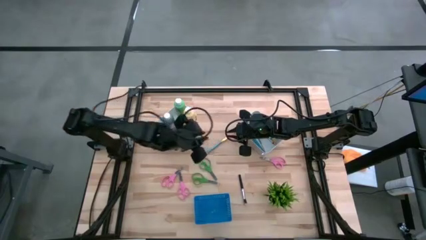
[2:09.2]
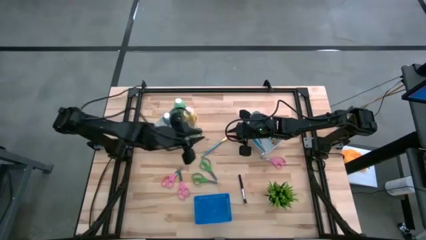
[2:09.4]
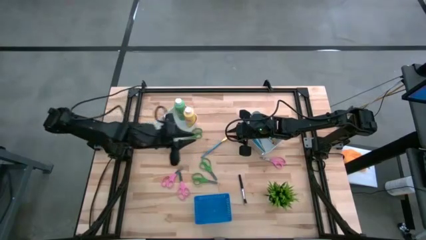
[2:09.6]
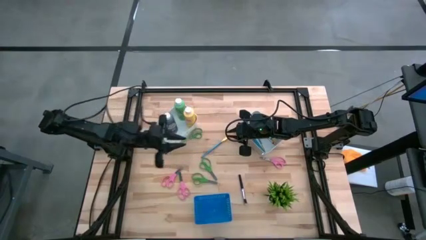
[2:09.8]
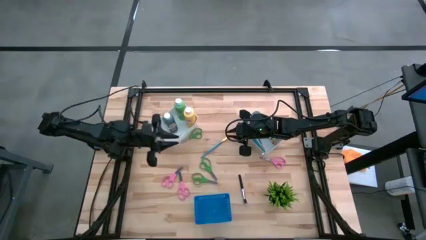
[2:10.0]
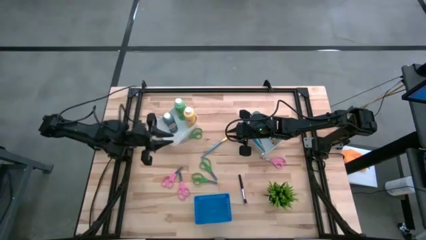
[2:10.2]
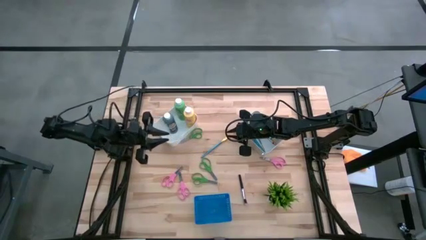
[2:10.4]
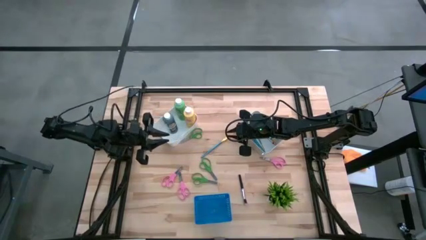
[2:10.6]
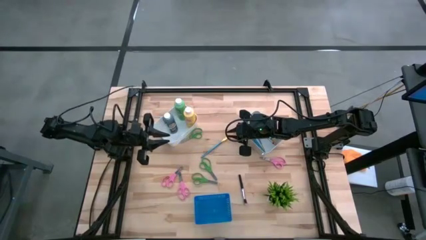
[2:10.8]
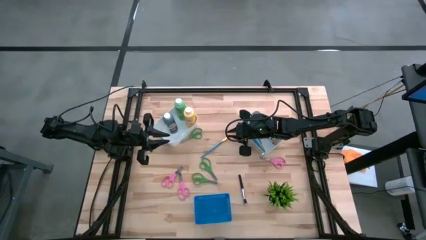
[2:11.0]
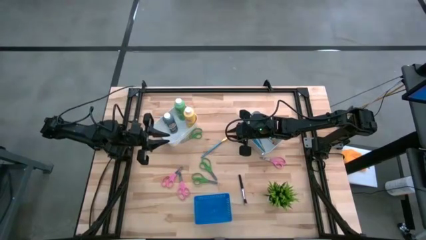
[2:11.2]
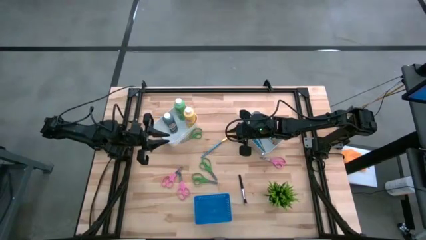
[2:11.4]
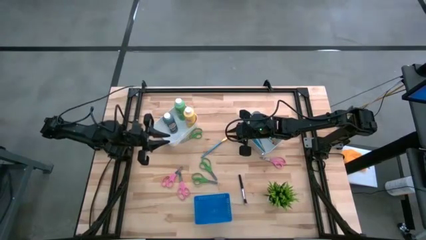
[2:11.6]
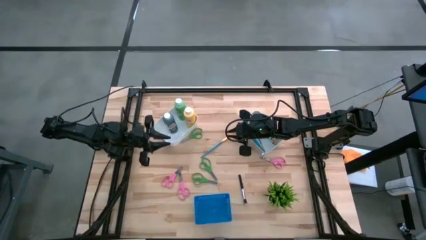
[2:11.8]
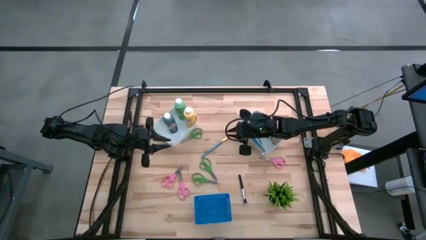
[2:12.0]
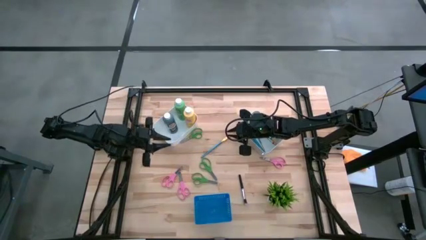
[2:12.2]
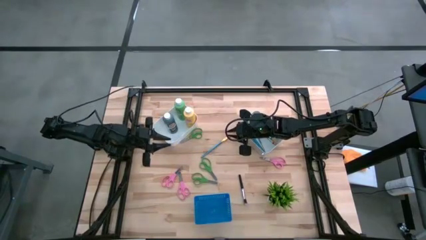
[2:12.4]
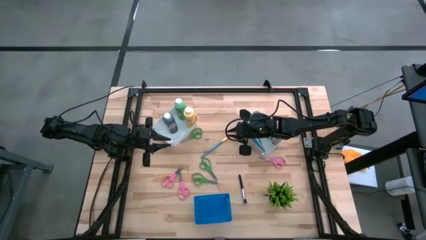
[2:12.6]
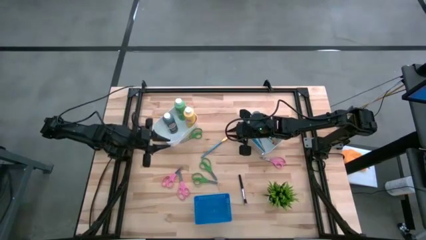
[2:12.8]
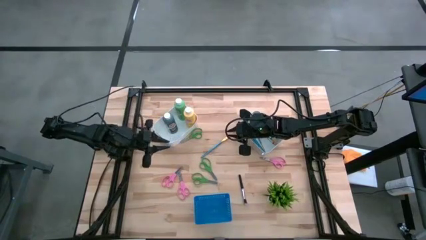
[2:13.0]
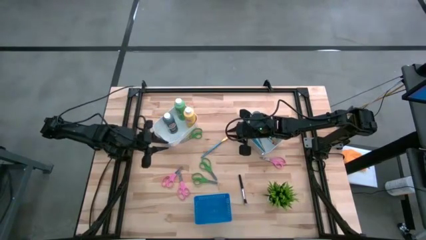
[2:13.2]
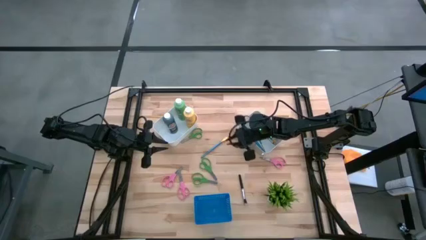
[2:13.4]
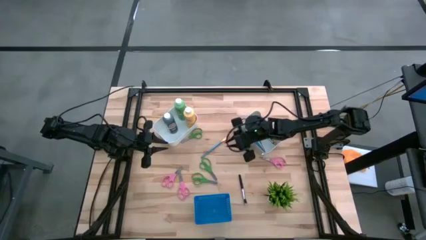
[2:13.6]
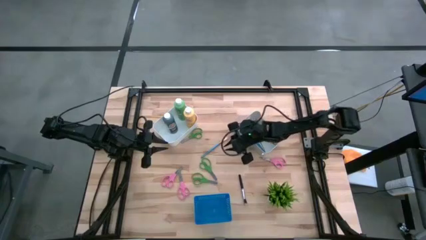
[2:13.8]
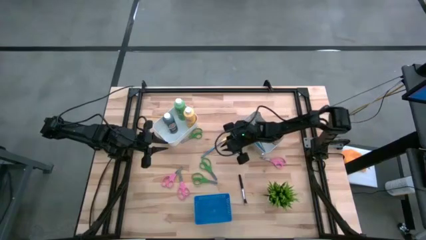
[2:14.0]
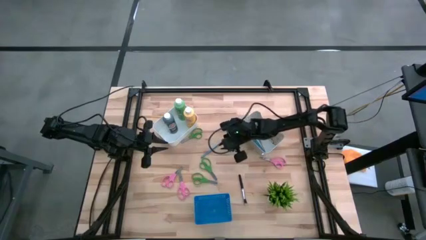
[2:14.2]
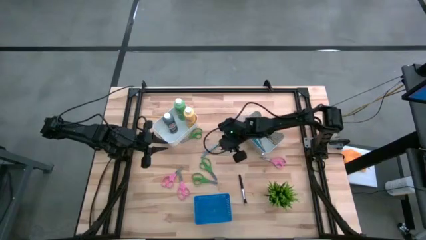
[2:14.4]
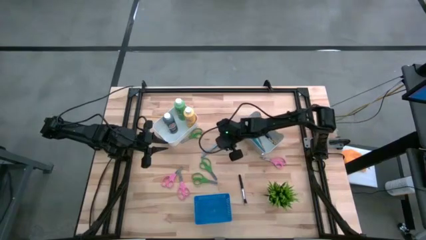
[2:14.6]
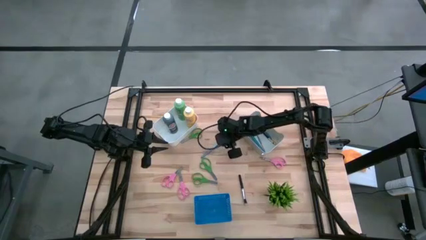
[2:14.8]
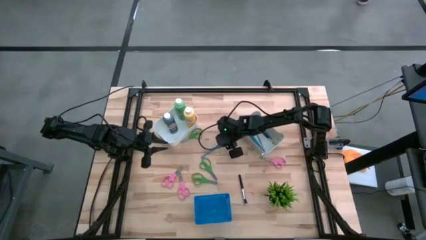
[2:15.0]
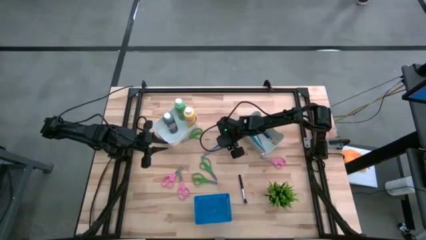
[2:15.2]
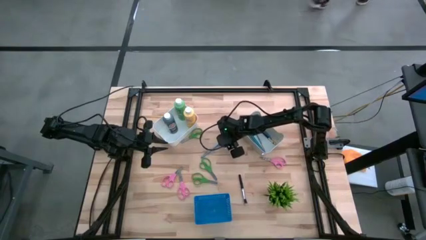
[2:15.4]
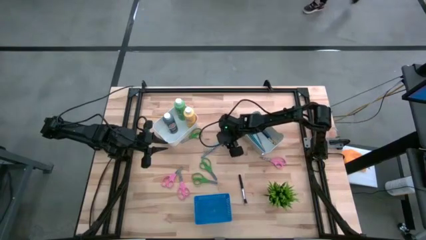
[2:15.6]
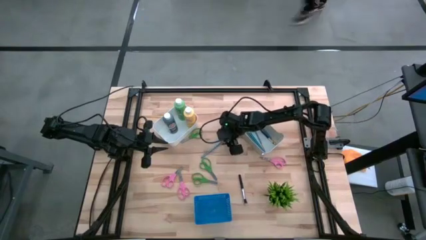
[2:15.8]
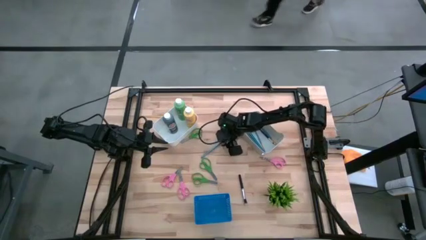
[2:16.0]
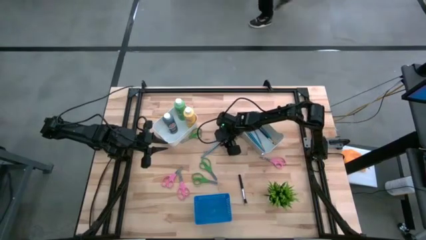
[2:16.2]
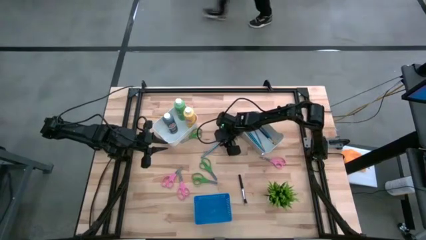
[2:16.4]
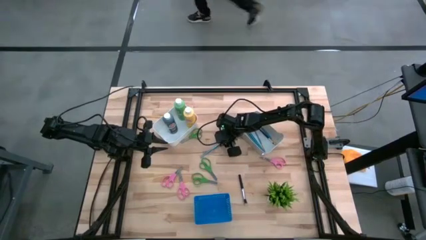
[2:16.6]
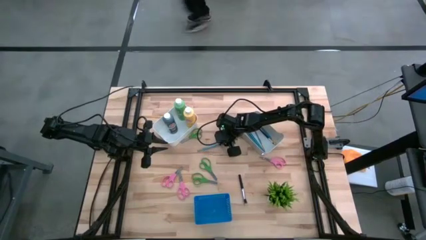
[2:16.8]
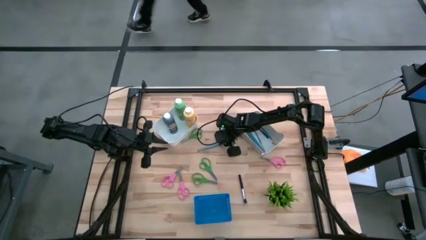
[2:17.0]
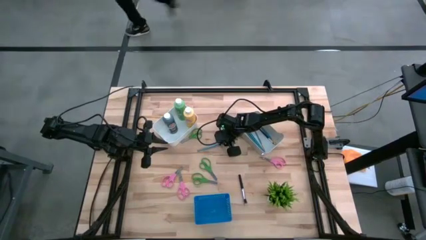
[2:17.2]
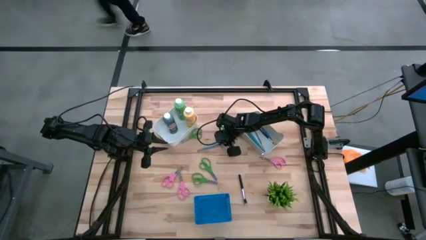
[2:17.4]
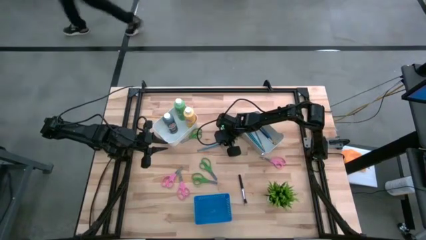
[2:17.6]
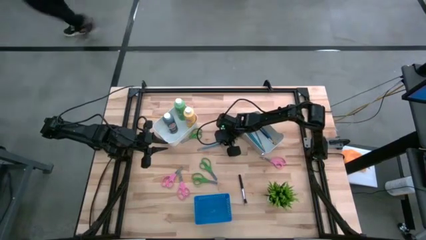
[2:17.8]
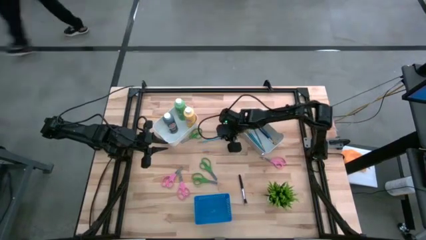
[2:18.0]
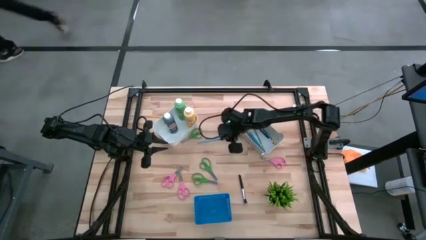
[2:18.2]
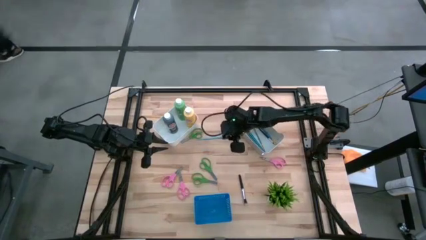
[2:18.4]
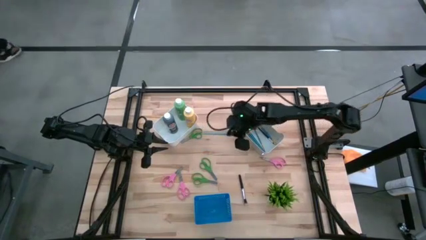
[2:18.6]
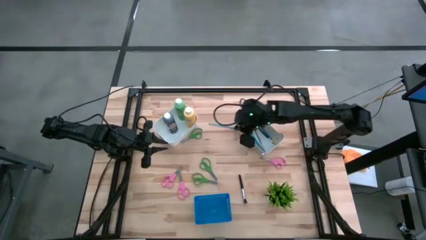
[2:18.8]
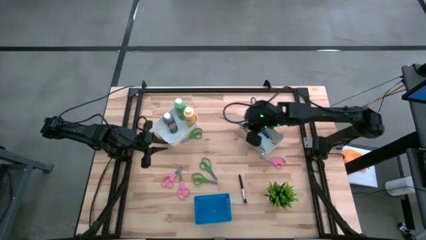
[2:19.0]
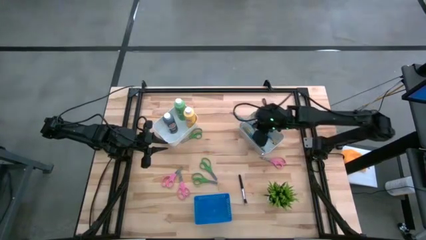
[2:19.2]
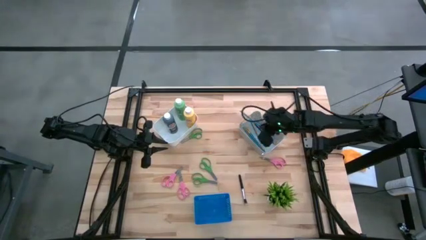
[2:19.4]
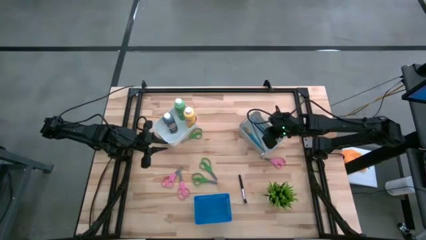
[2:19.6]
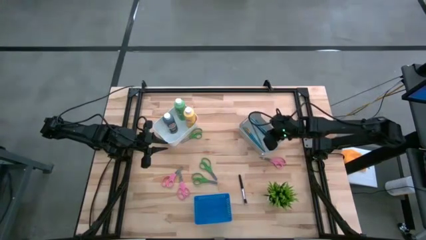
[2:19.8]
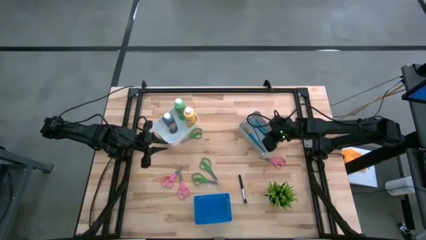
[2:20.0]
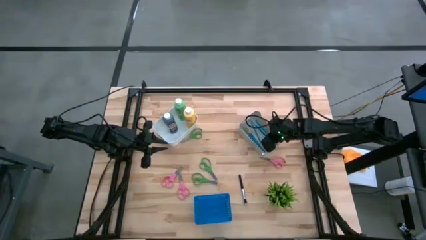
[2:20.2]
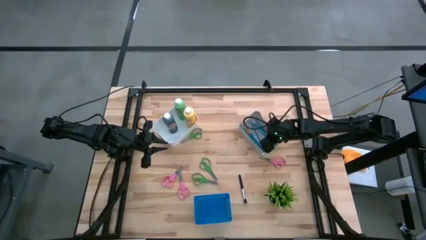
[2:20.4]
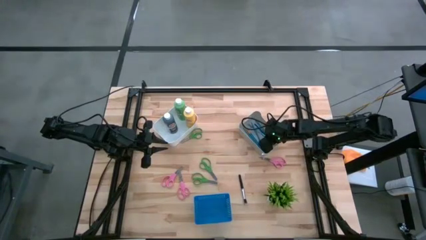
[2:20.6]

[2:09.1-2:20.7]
Task: Pick & Place Paint Supplies
Put the blue paintbrush into the gray bin

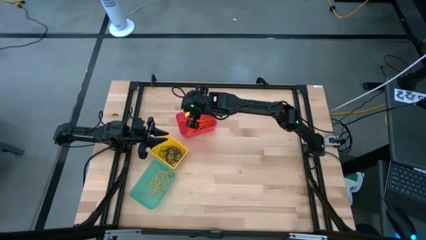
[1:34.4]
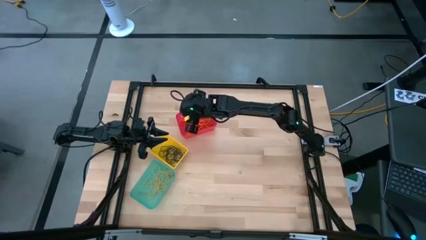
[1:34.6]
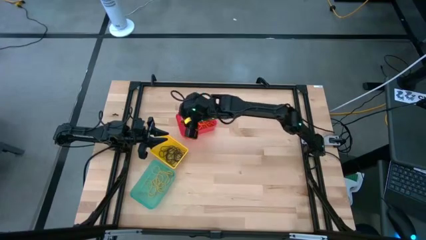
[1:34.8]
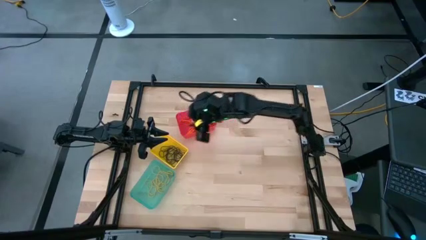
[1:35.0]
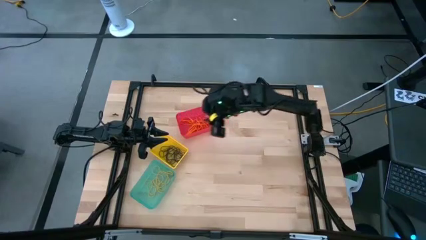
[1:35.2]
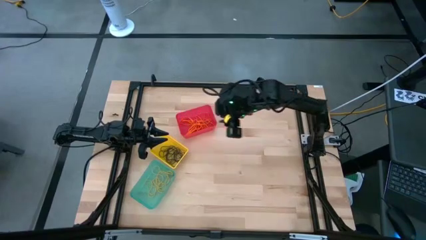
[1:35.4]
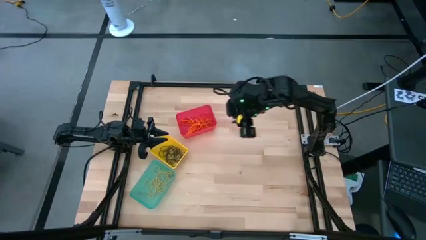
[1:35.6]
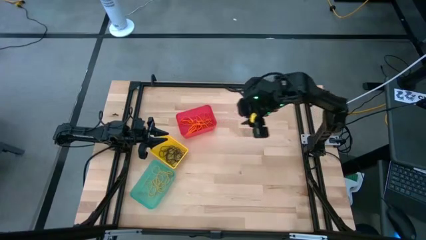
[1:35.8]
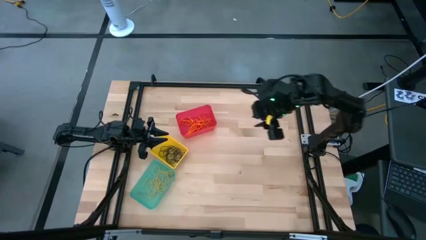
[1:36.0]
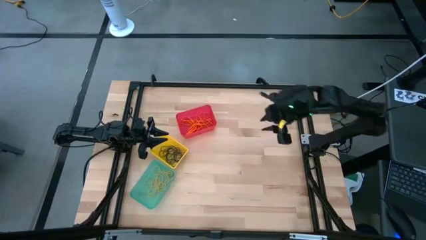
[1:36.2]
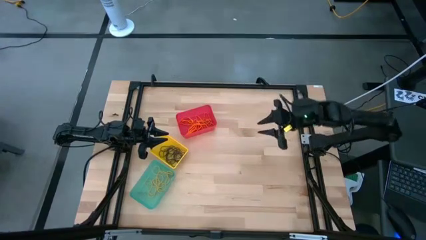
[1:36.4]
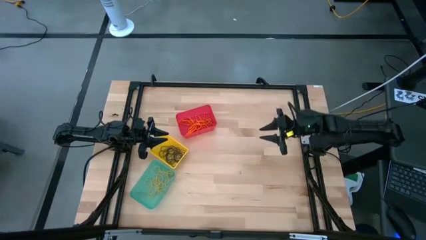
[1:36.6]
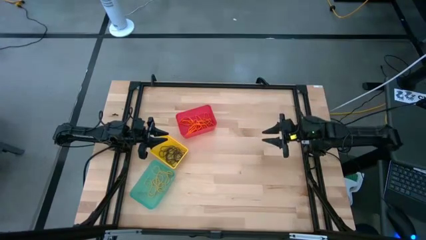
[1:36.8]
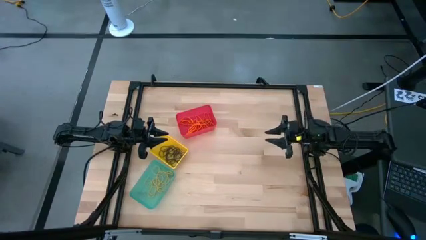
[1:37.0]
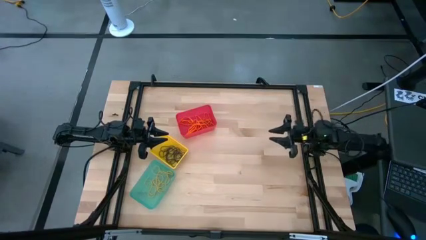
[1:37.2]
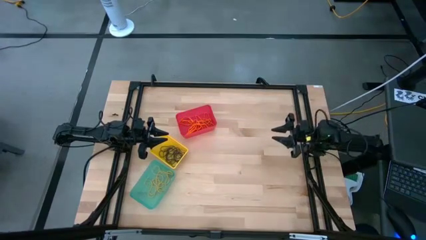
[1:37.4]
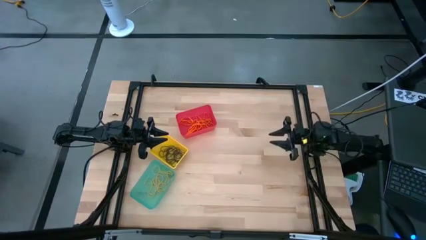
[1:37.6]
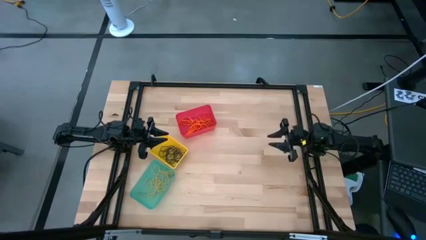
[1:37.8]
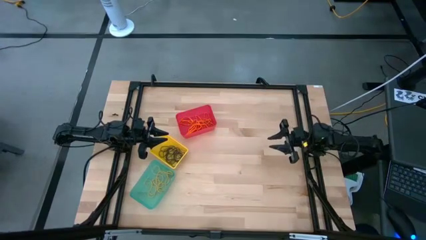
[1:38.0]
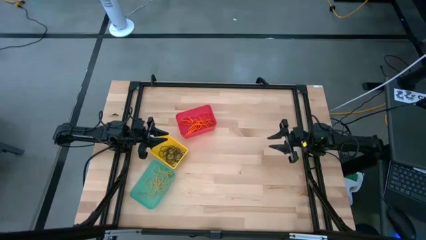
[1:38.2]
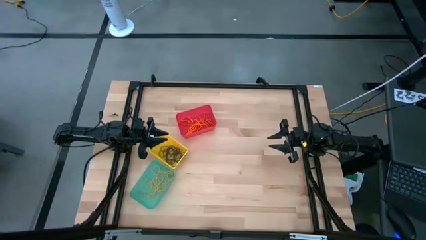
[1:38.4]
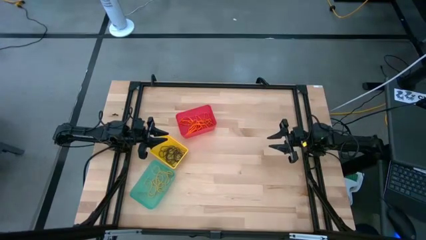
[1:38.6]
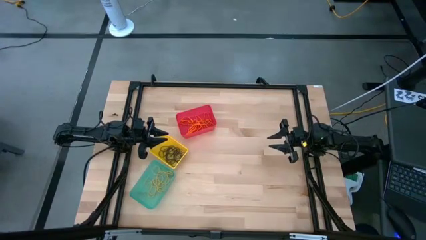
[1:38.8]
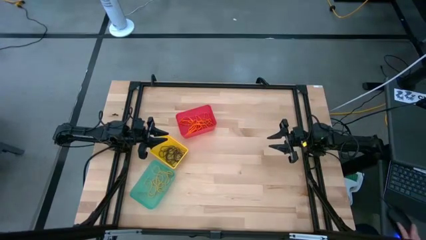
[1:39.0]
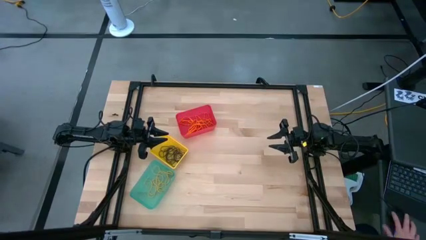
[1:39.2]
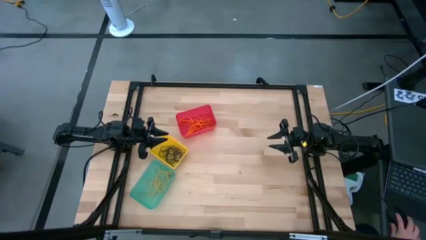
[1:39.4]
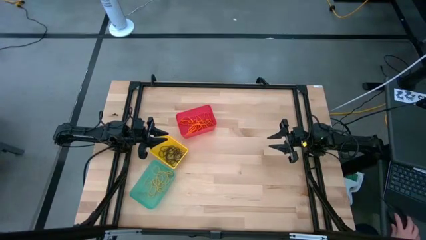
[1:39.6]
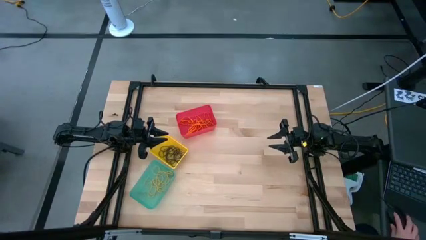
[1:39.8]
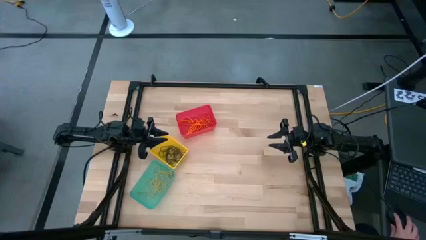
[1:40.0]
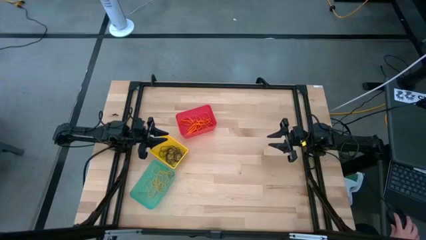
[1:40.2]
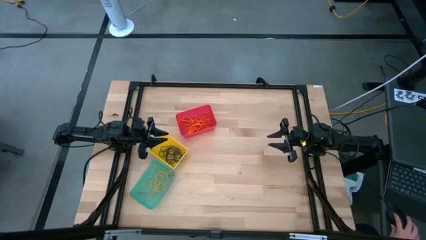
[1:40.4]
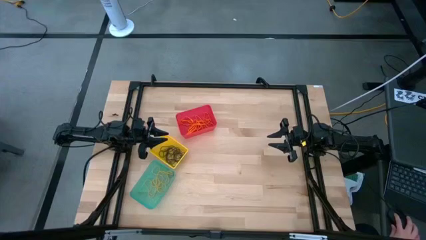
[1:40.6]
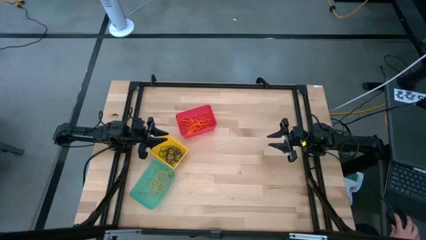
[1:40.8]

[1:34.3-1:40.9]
Task: Sort rubber bands into baskets
Return to Home Position
